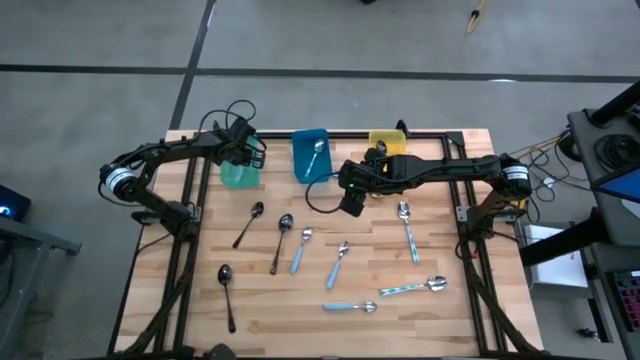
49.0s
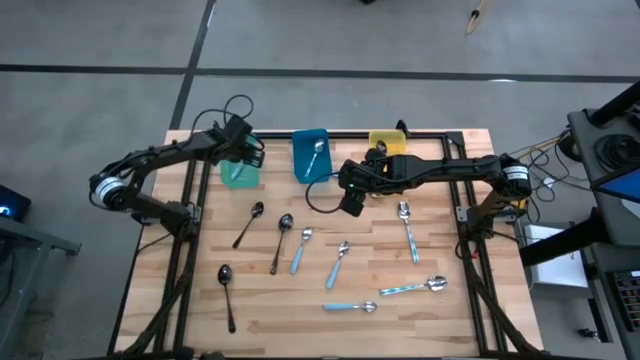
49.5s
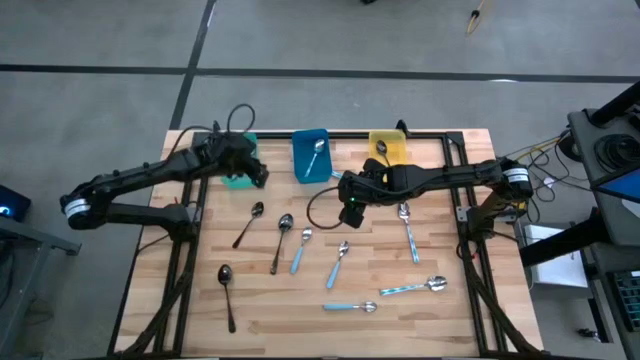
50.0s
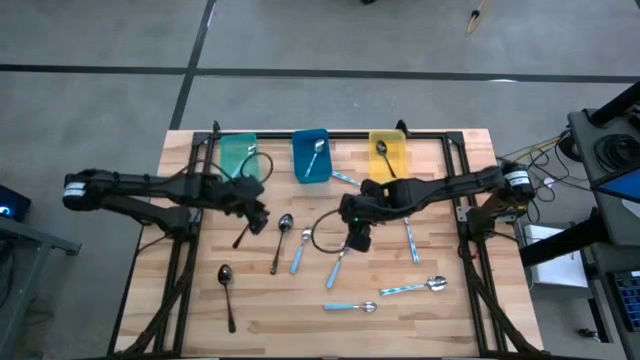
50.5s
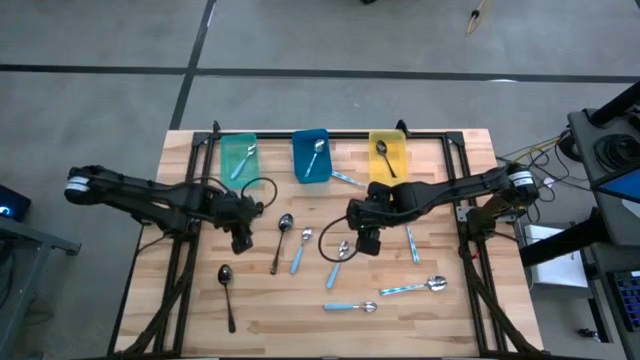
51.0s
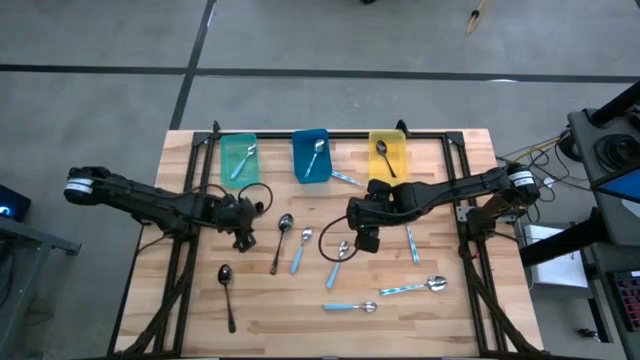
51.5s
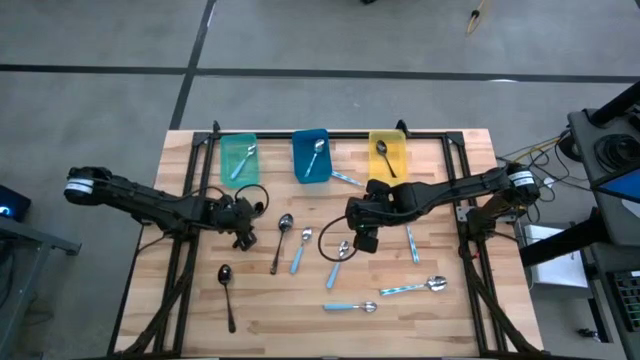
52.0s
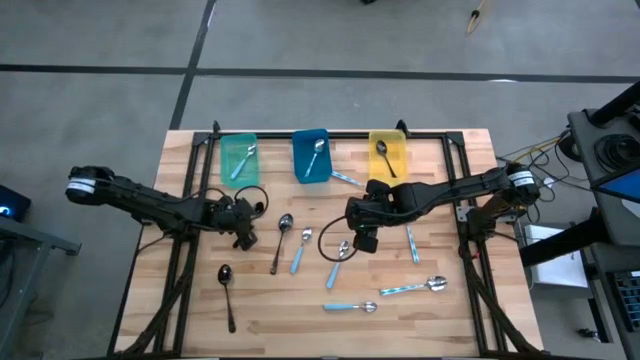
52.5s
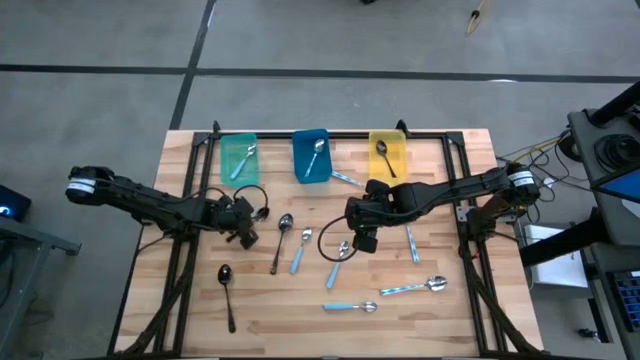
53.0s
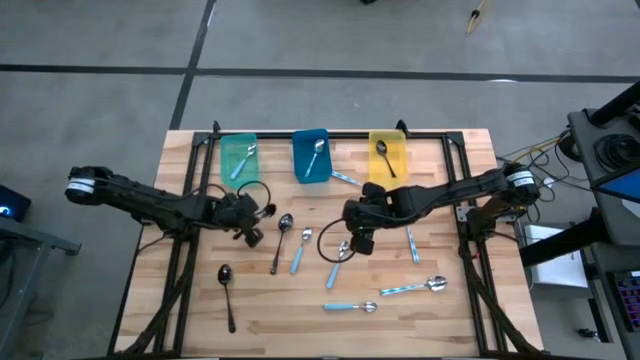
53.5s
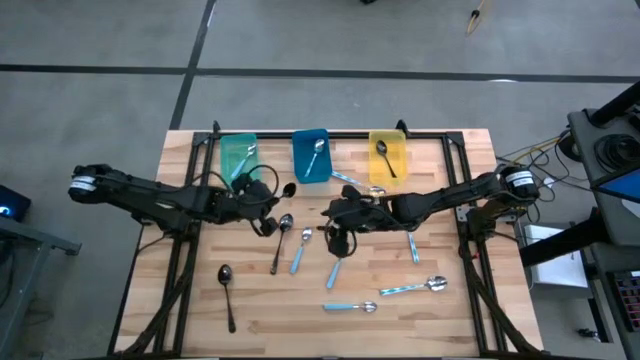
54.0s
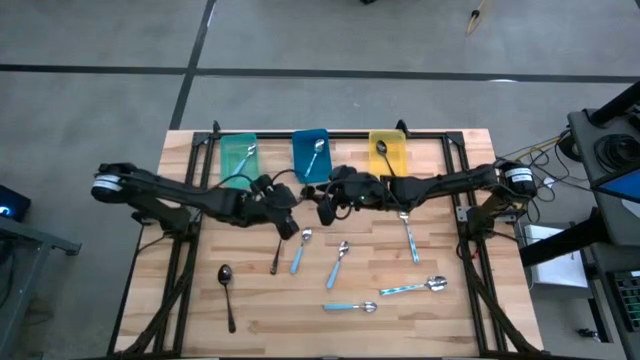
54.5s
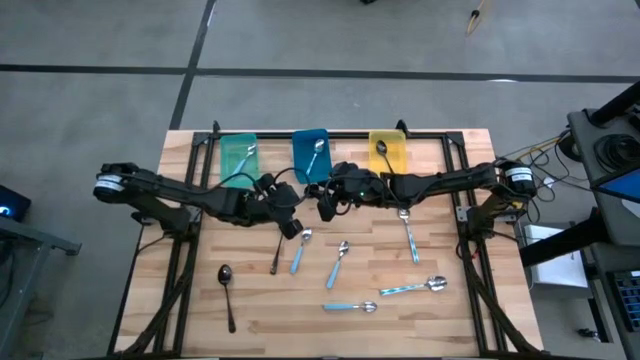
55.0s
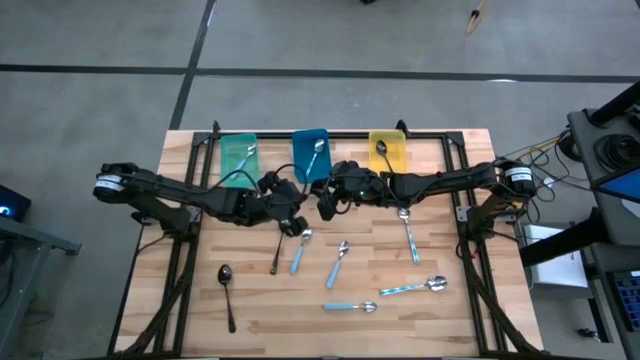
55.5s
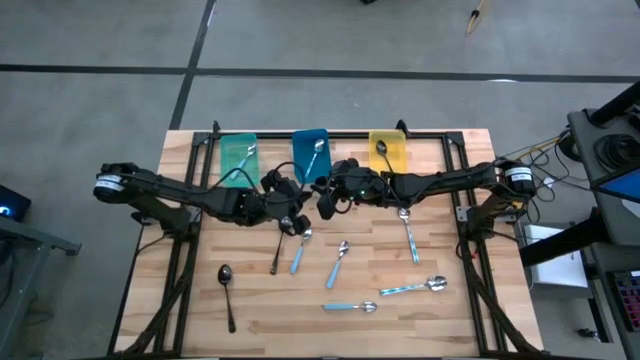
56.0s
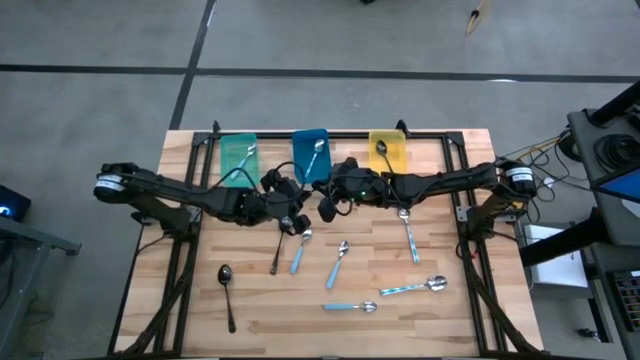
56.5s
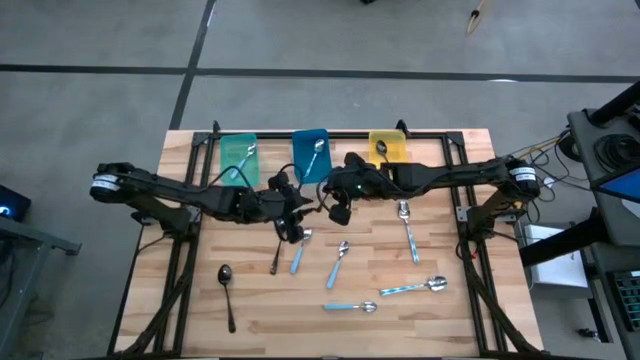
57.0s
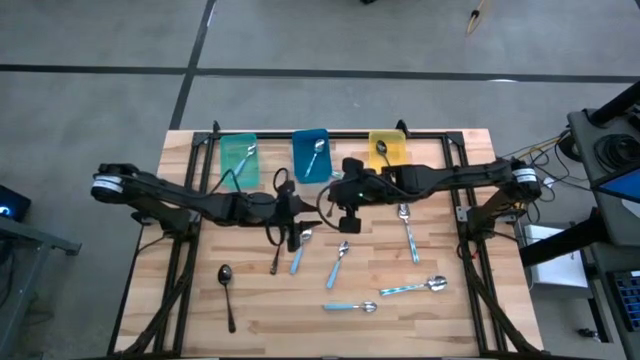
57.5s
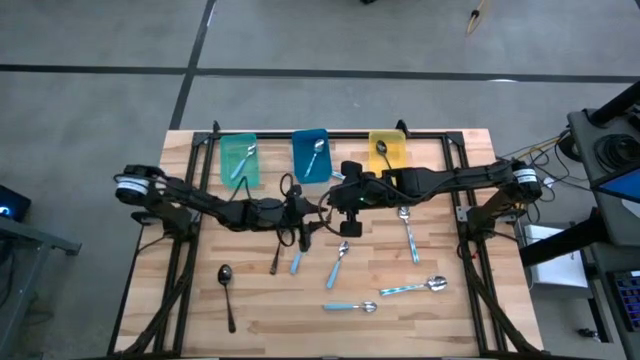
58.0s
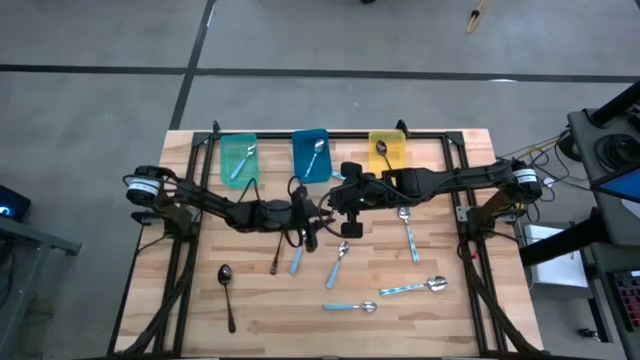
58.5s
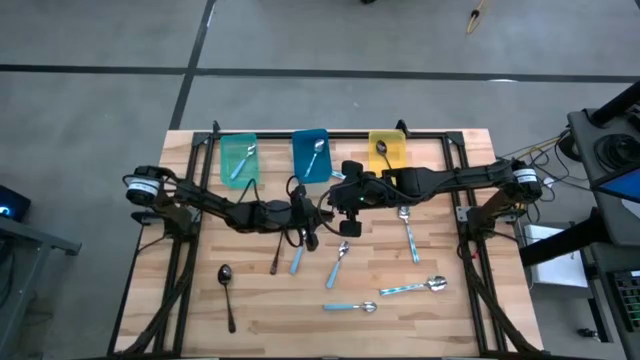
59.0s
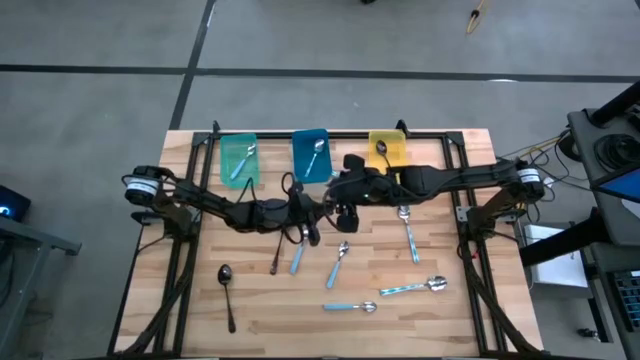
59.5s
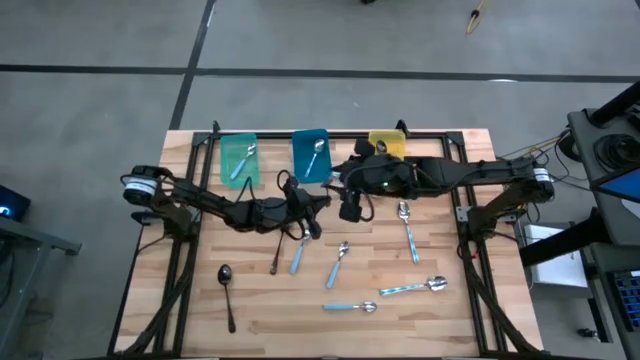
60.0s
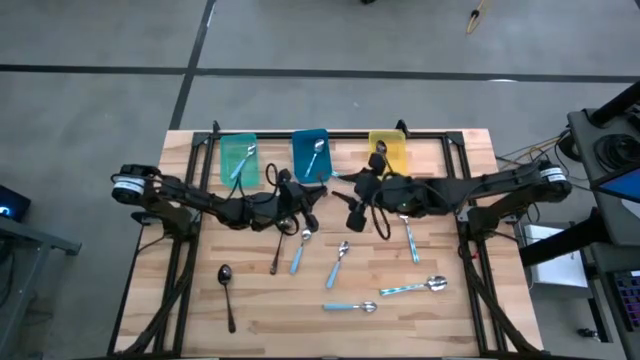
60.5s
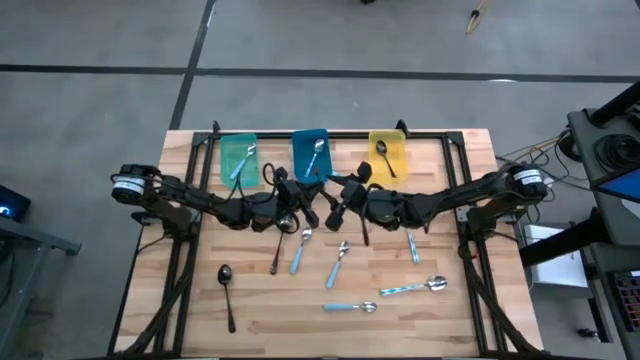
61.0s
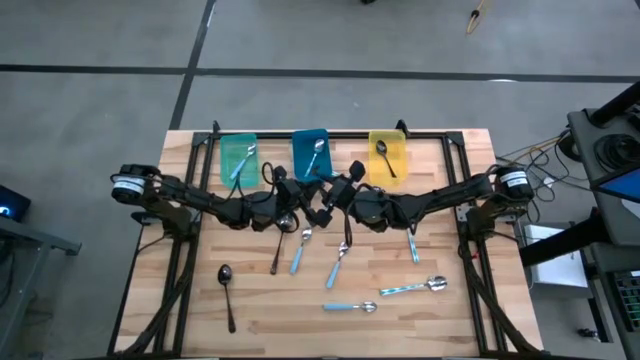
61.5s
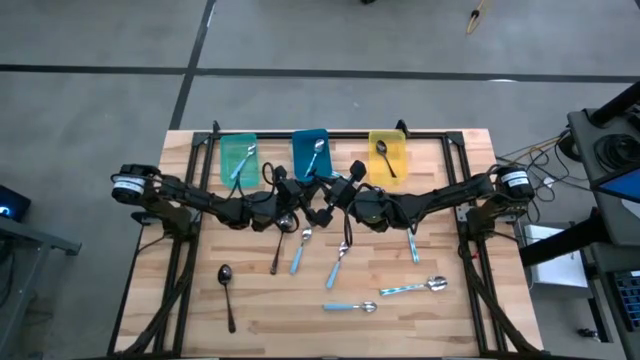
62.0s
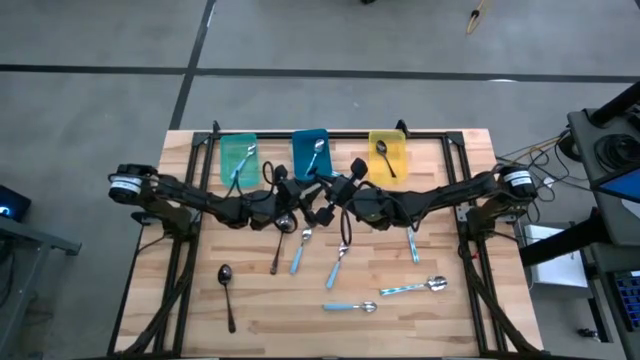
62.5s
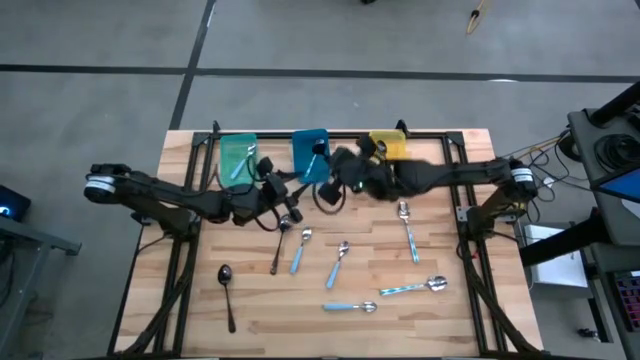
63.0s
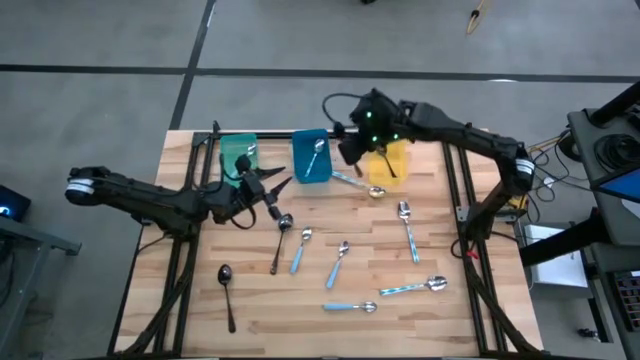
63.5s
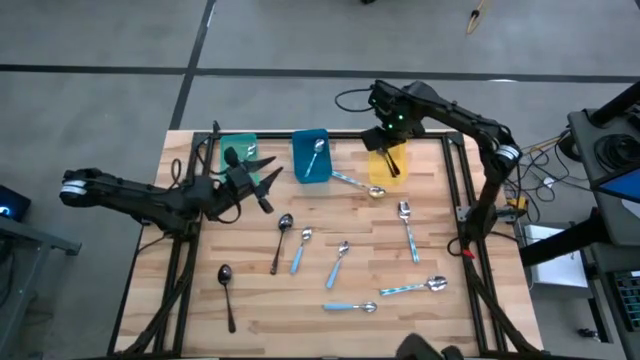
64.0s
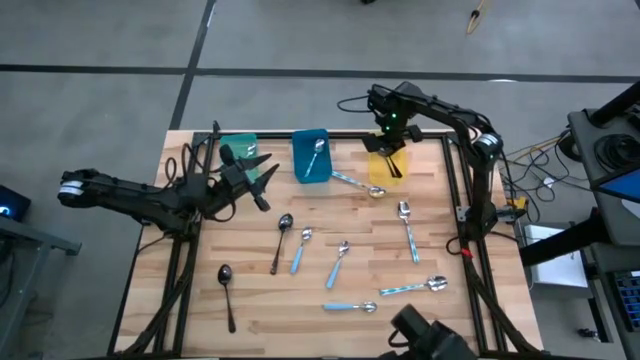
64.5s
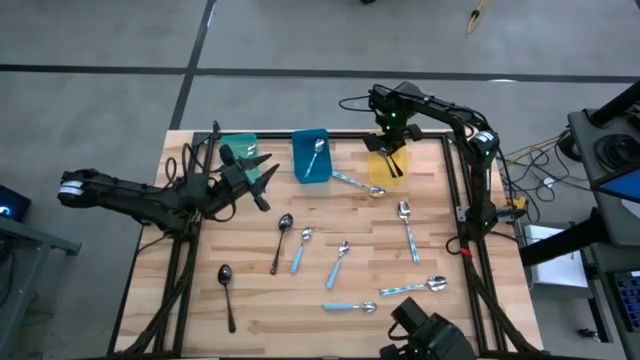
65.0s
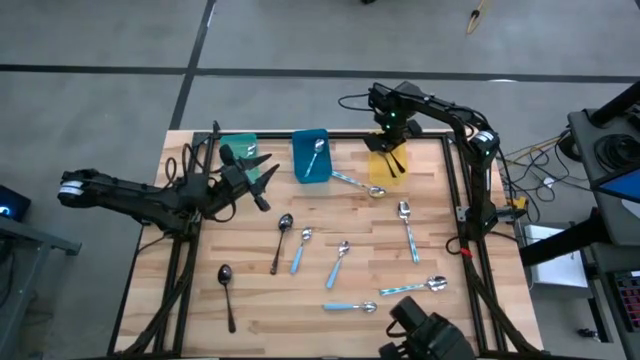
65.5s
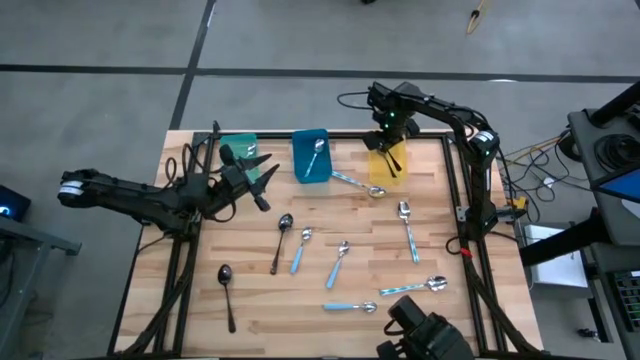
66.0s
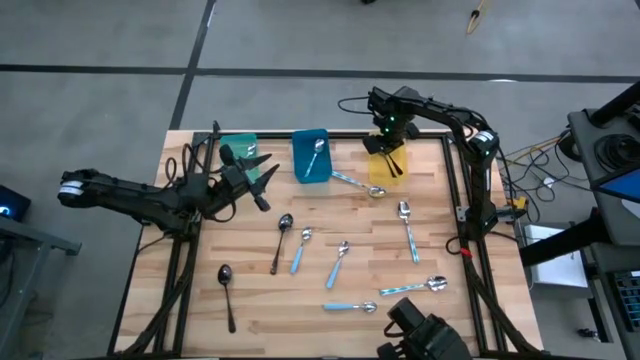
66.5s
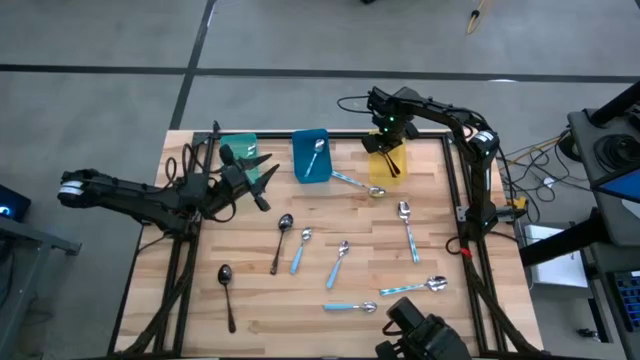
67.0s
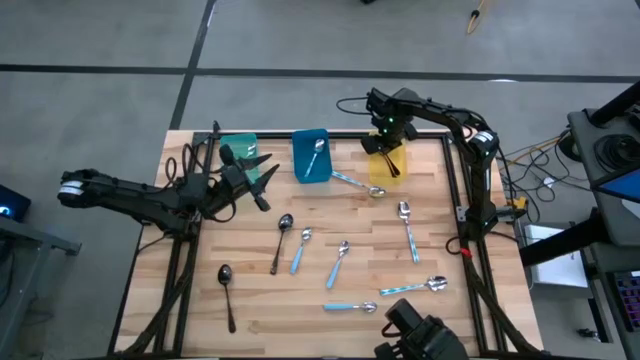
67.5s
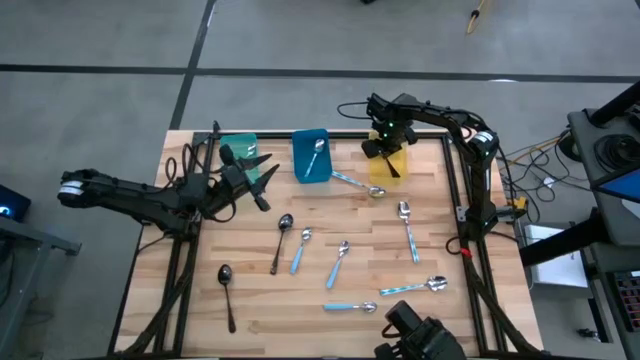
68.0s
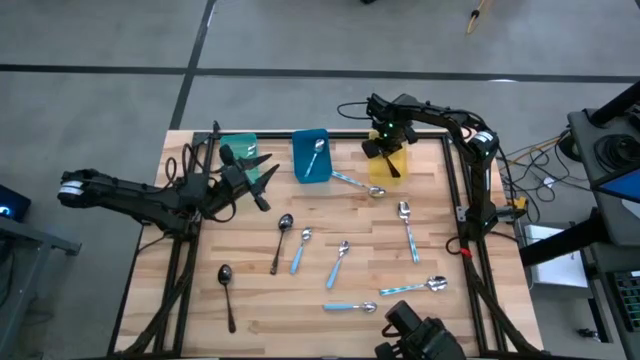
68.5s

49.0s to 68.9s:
Task: Sort silverware by color (type)
Put the black spoon into the yellow bin

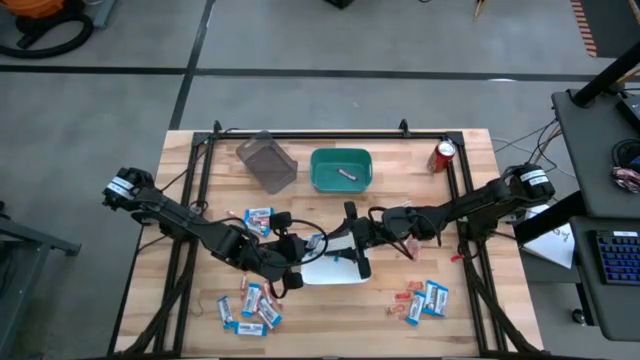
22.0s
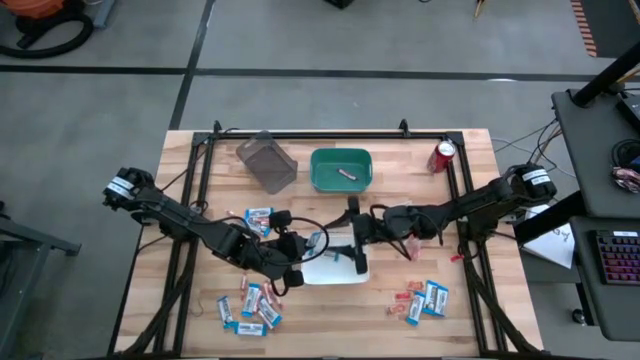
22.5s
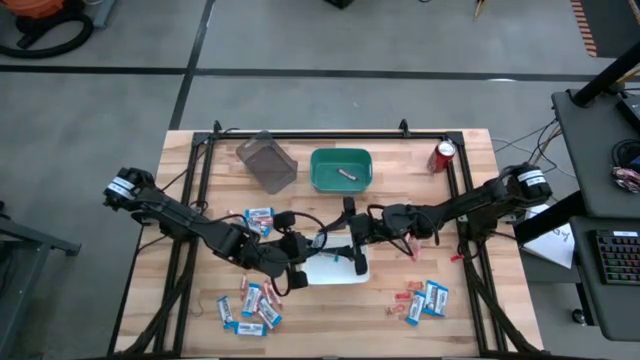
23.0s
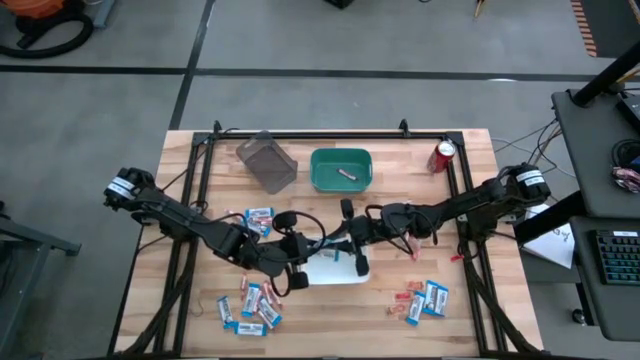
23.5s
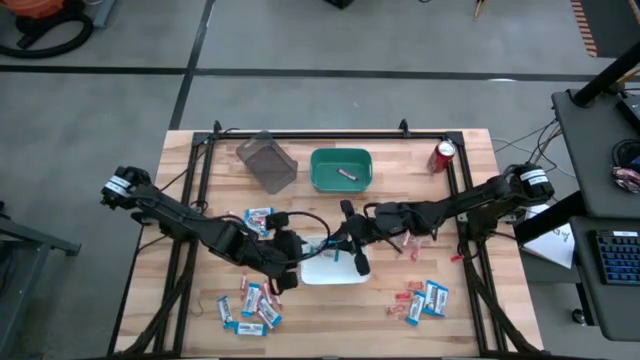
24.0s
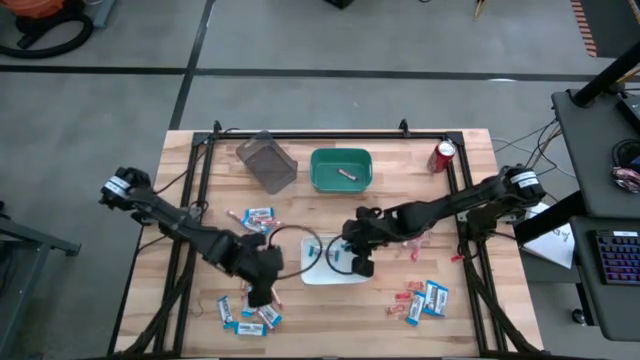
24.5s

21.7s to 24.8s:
Task: Sort candy
Put the white chocolate bar into the white bin
